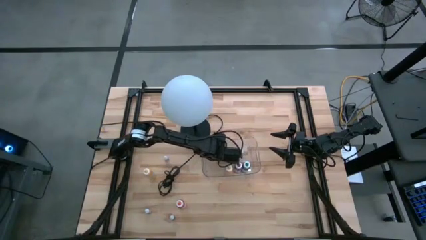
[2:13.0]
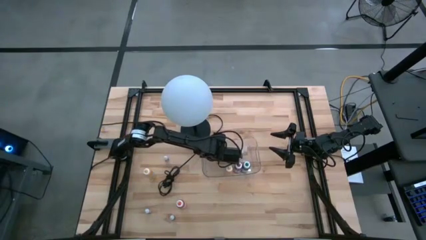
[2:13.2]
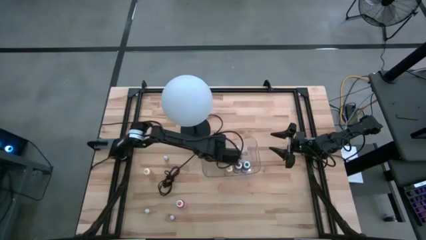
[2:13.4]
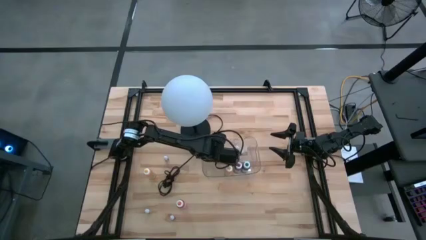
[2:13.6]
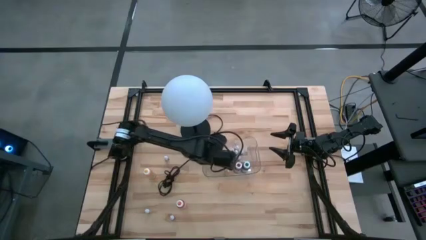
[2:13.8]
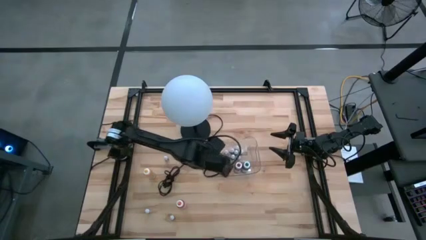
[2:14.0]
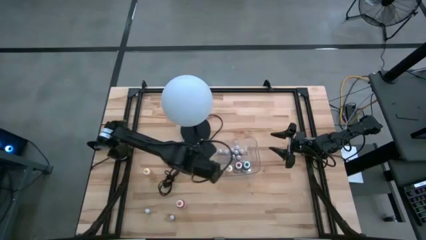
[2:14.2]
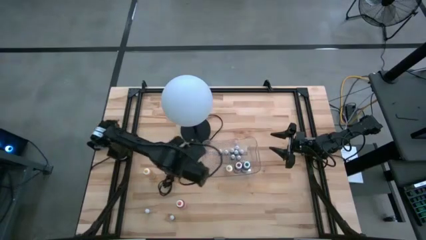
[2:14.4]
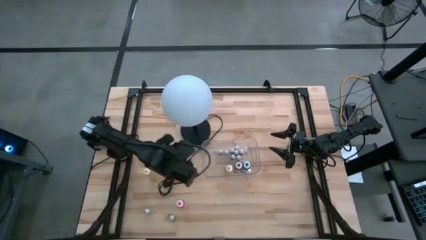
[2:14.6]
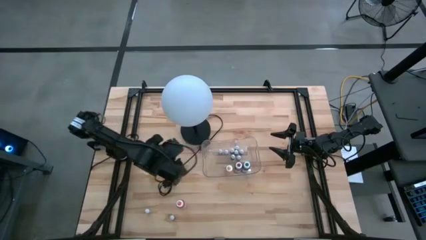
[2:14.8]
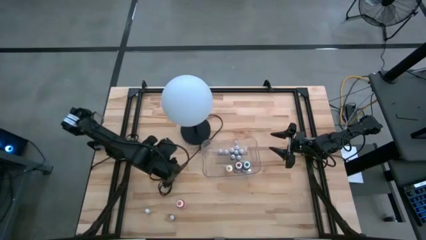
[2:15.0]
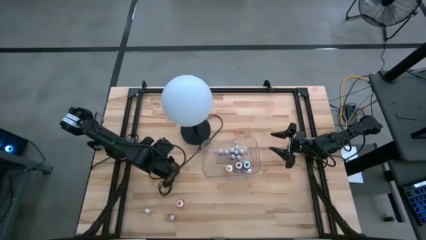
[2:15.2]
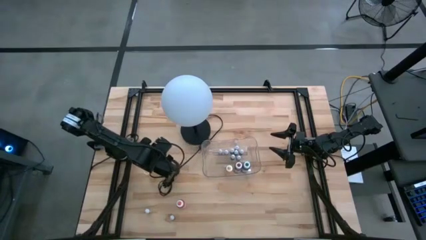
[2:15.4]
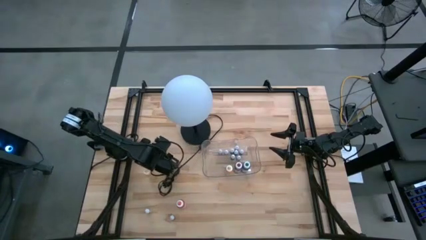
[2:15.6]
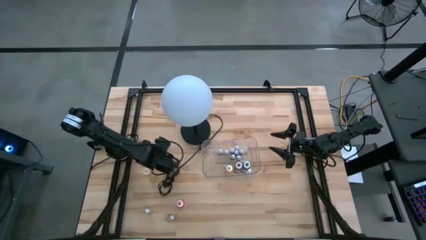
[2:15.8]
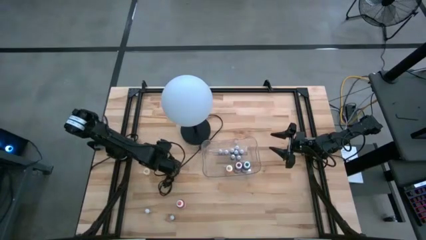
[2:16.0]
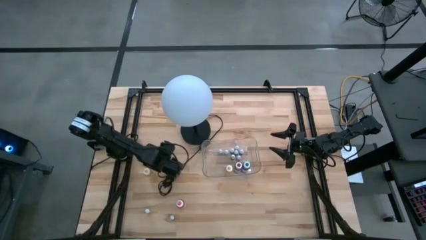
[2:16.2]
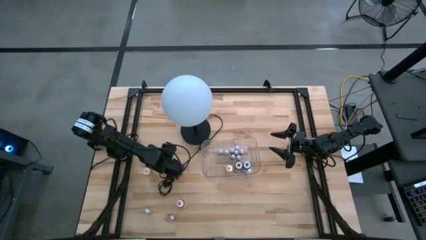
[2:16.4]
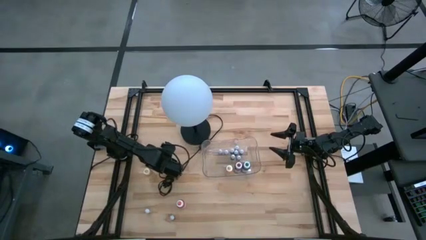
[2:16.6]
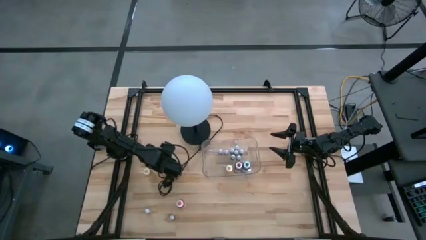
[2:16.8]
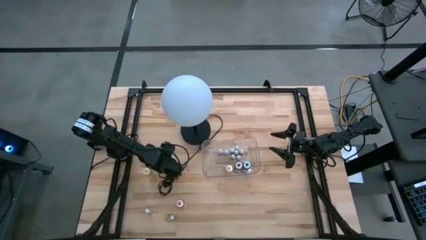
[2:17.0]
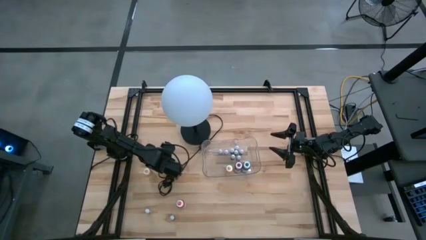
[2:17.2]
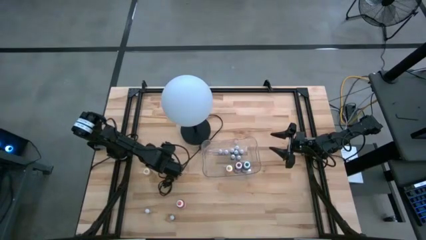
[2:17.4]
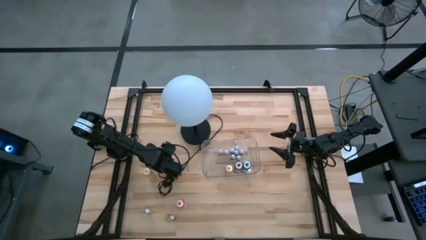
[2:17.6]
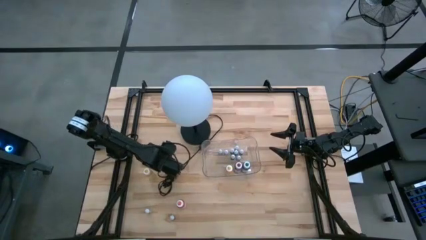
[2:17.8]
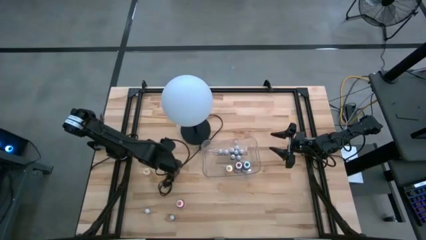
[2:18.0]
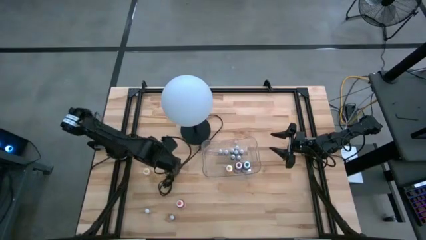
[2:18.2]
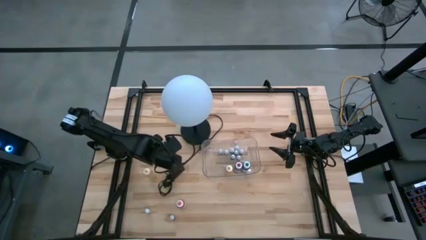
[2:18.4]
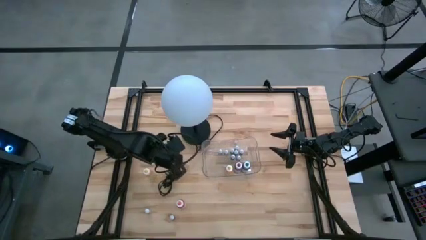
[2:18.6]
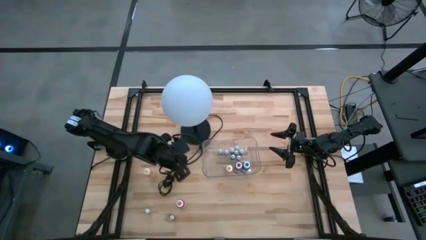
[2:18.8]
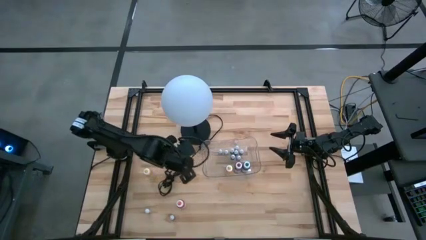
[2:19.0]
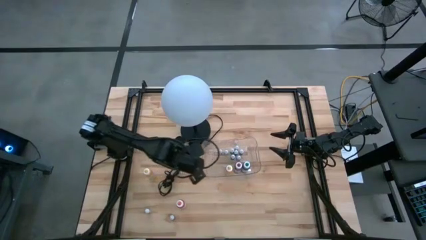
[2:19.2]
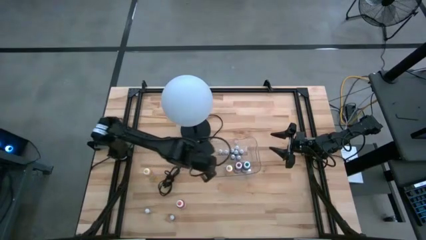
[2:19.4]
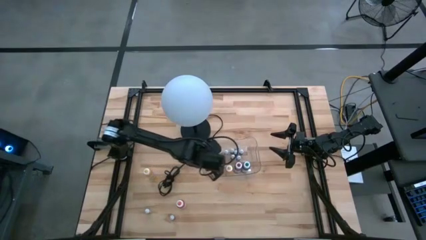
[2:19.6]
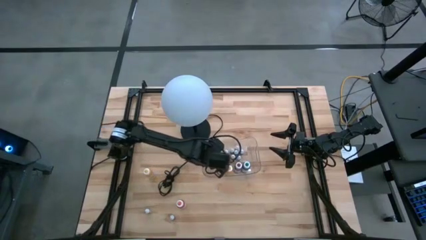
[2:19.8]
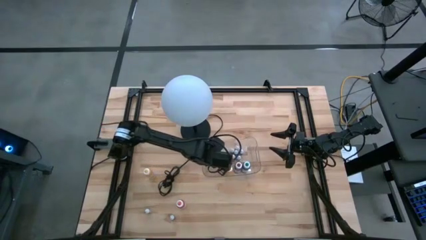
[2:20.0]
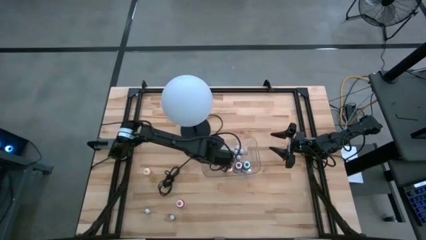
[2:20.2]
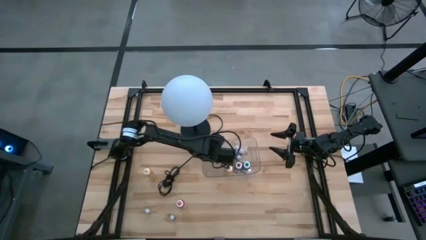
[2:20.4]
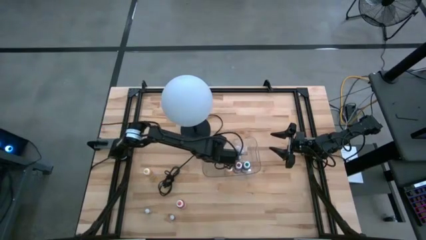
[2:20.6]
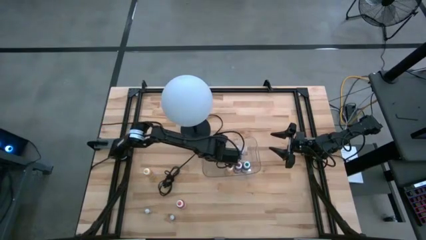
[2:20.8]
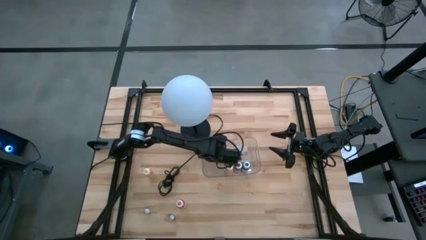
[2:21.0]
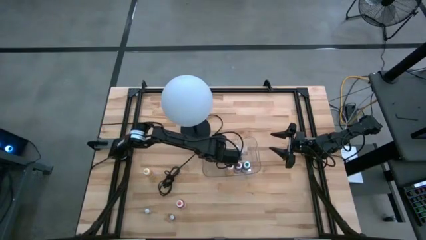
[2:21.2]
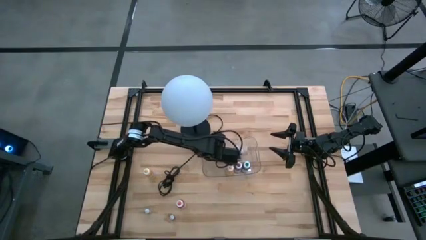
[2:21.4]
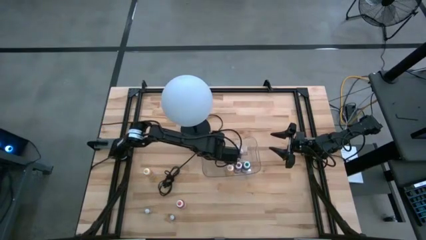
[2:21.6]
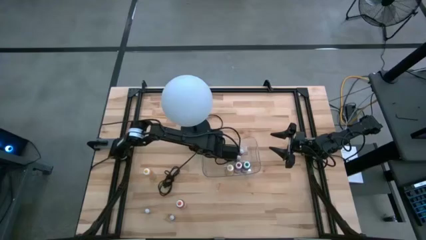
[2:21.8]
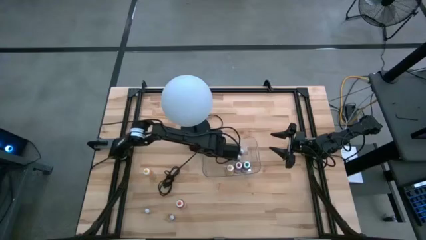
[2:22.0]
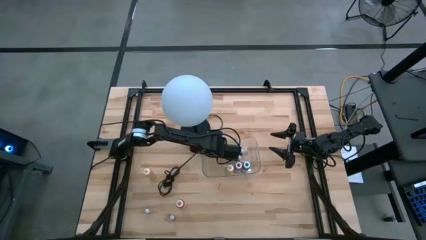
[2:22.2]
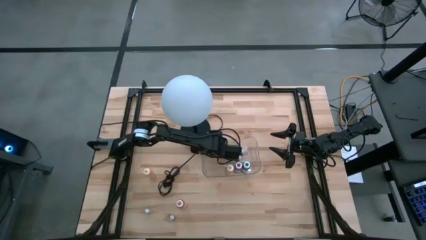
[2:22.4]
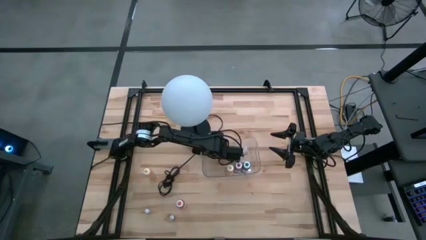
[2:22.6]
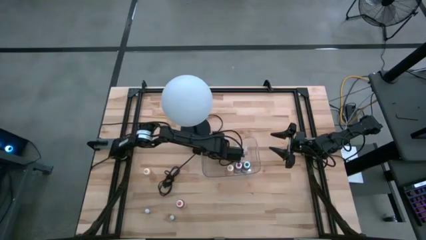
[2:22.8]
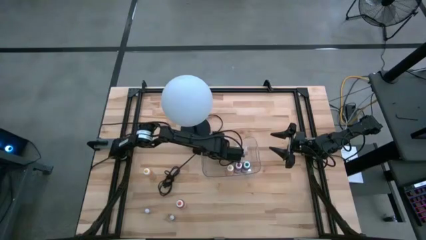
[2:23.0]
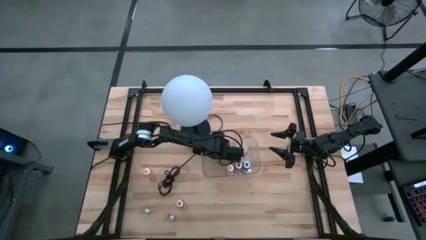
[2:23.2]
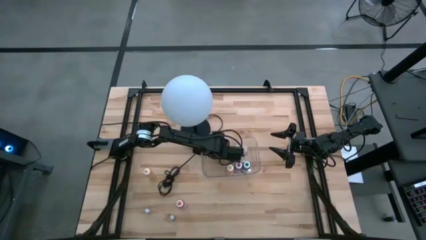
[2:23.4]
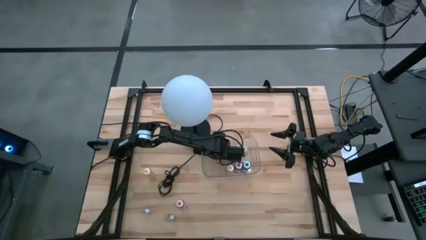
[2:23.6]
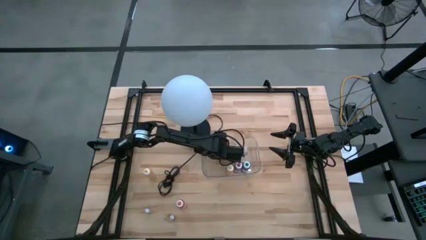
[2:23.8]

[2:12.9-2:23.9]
Task: Pick & Place food coloring
Put the small red food coloring bottle into the transparent bin
